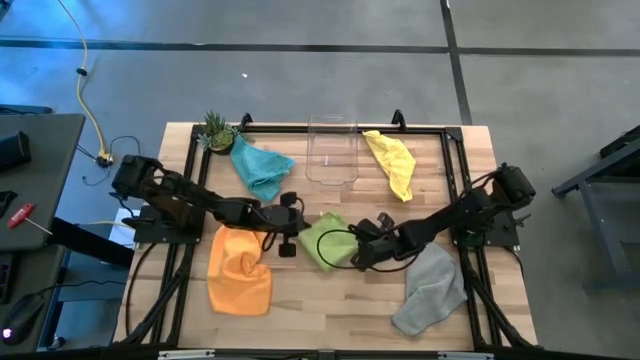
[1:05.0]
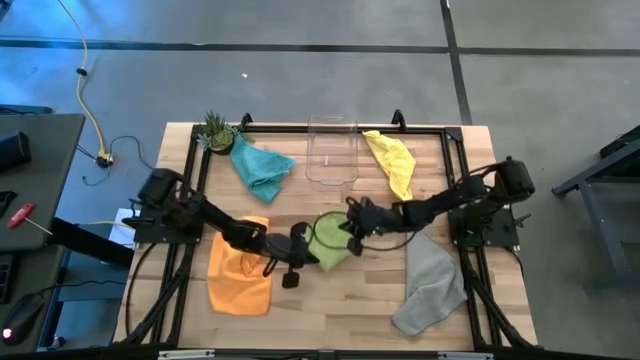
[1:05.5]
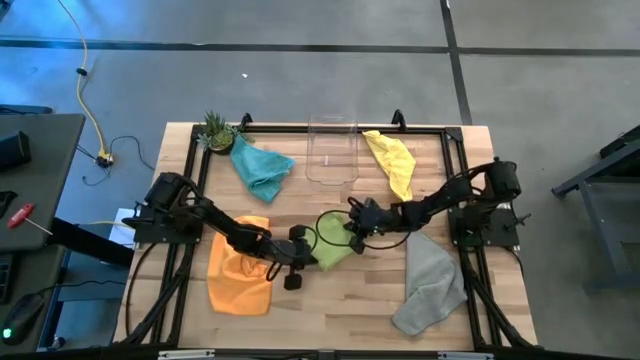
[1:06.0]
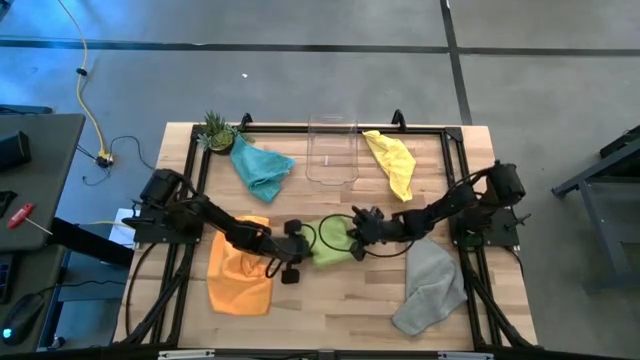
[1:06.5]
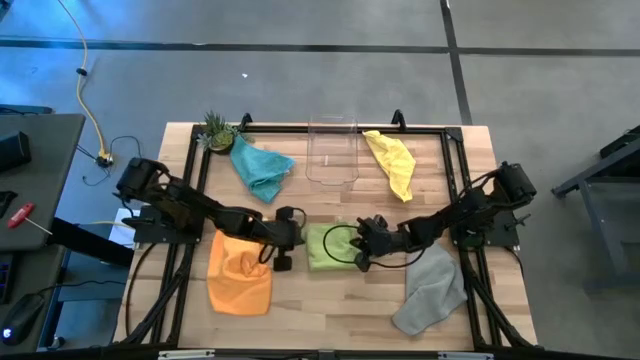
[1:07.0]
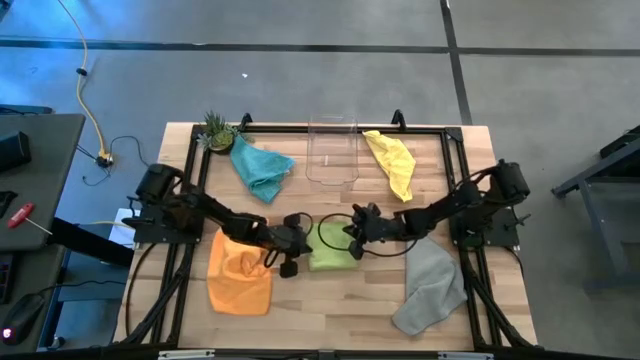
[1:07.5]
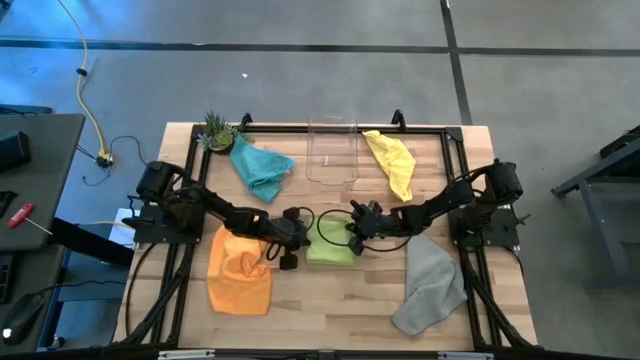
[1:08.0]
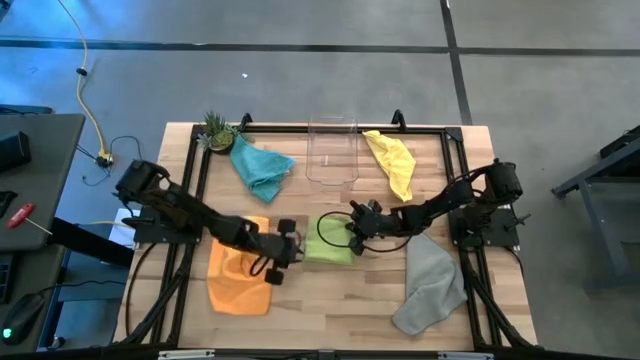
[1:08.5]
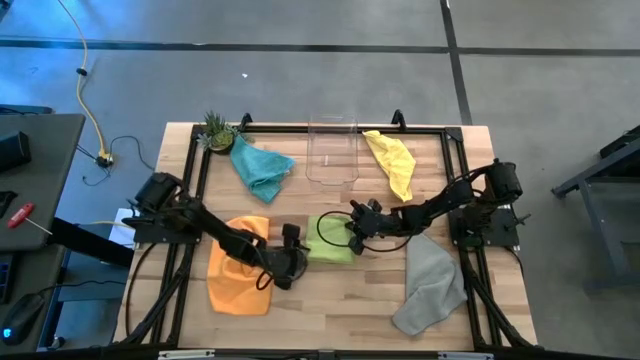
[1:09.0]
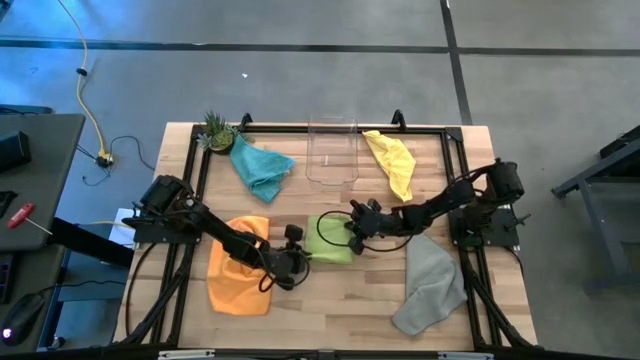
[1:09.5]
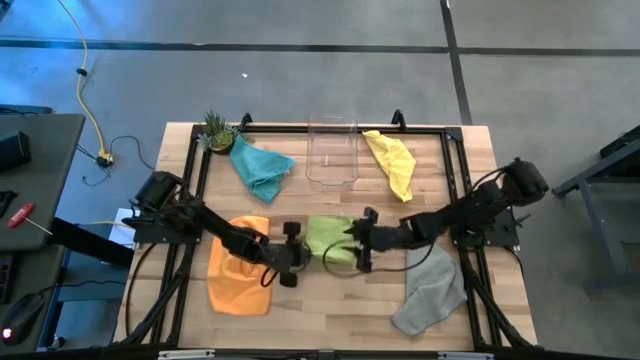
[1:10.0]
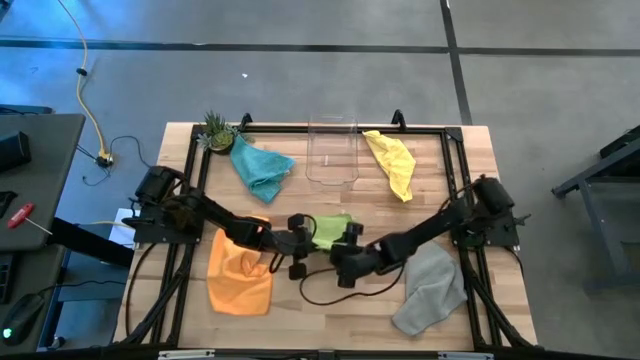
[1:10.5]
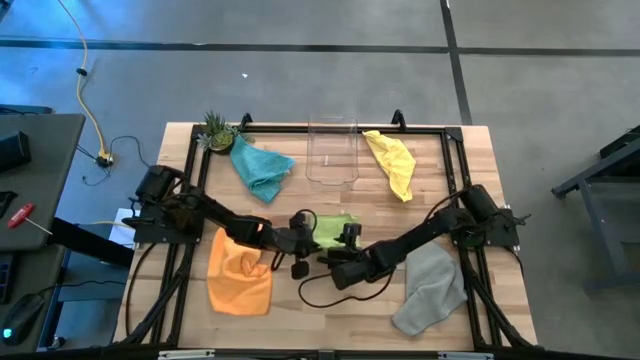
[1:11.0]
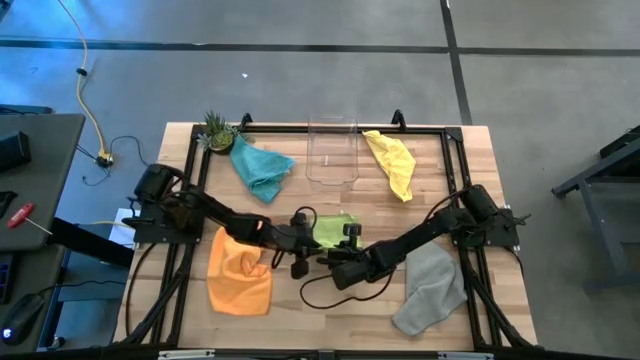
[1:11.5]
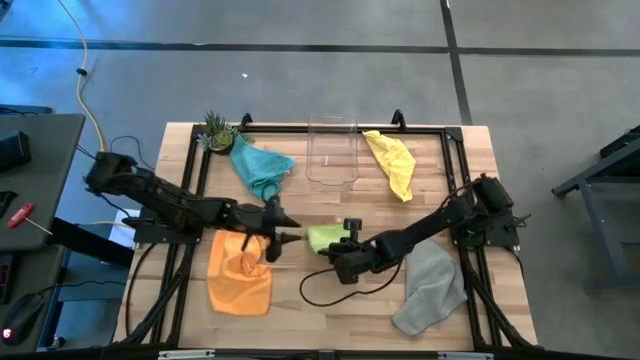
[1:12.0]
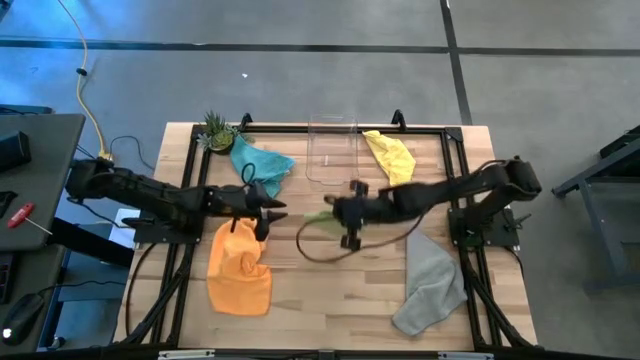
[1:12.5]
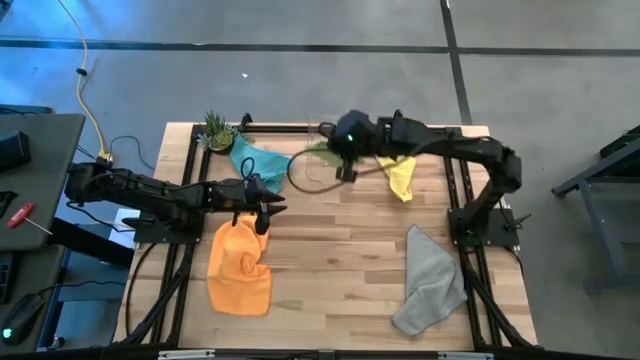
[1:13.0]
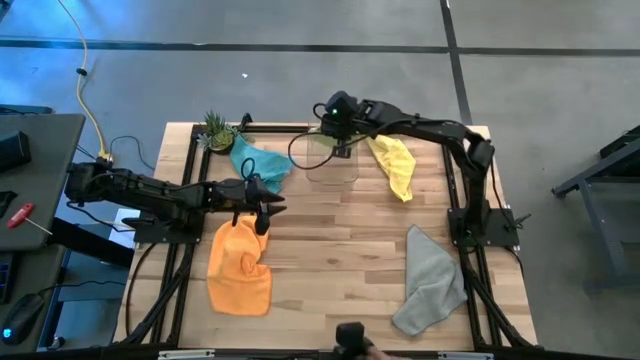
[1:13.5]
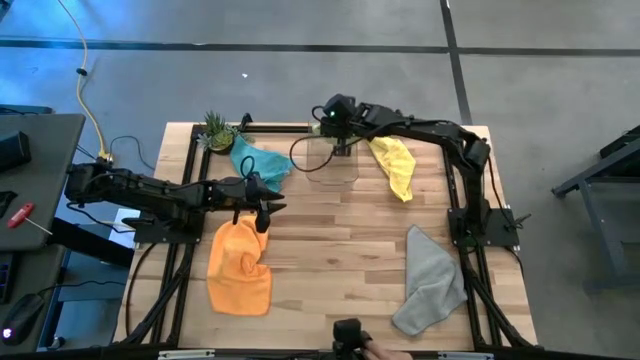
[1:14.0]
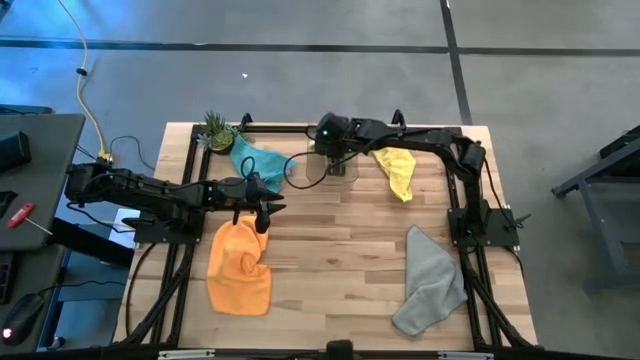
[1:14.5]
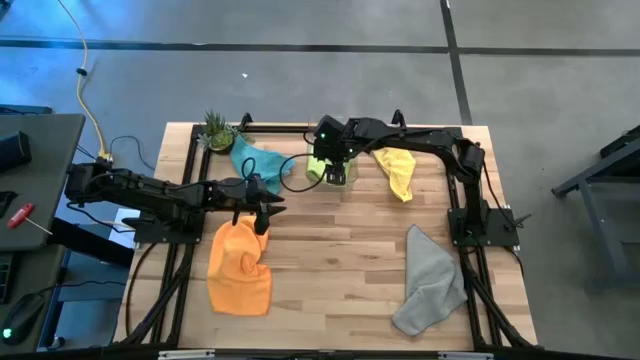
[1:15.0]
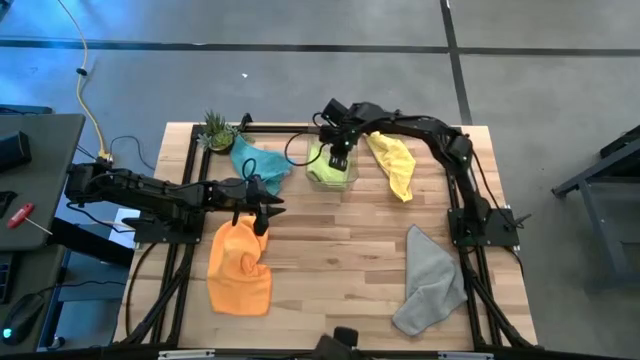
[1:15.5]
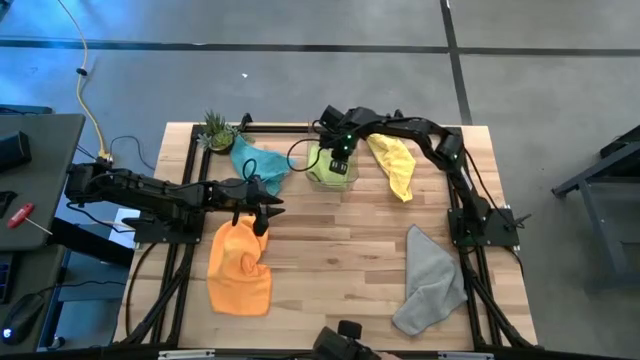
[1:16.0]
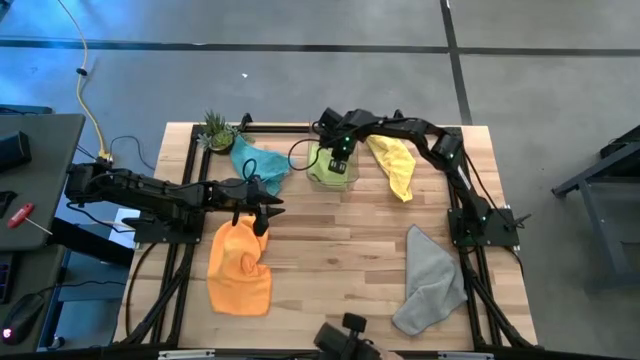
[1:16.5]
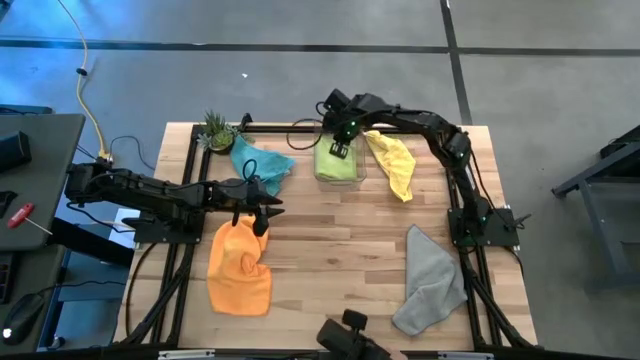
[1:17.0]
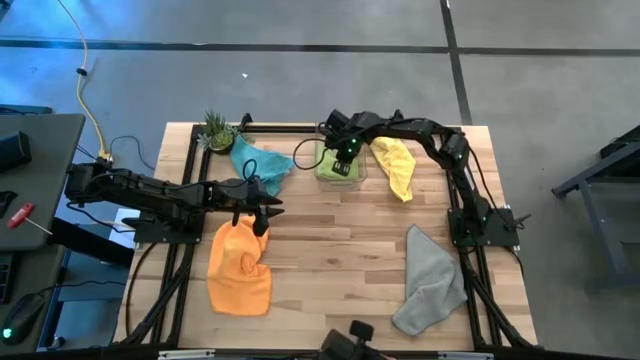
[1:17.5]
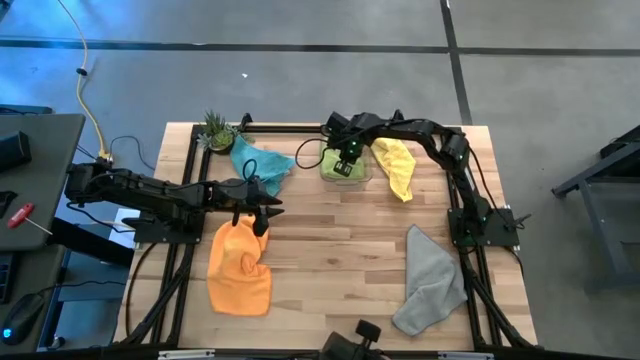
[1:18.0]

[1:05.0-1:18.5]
Task: Fold microfiber towels
Put the green microfiber cloth into the transparent bin

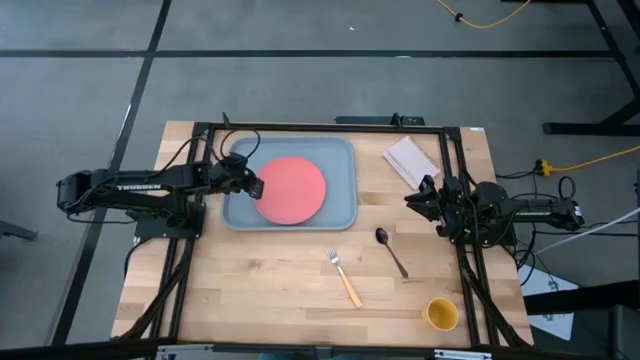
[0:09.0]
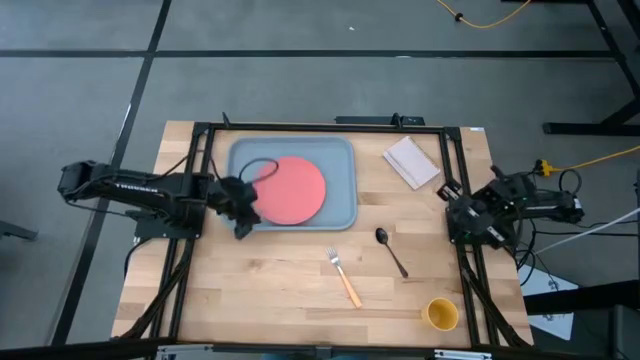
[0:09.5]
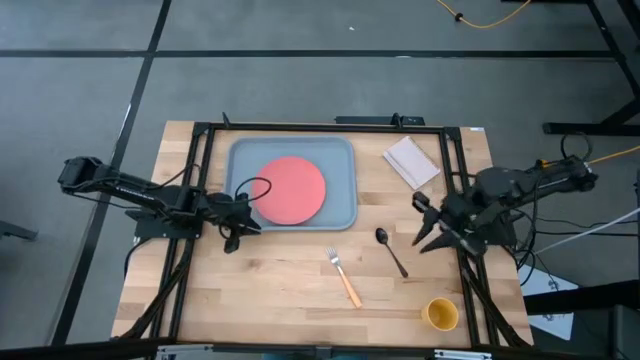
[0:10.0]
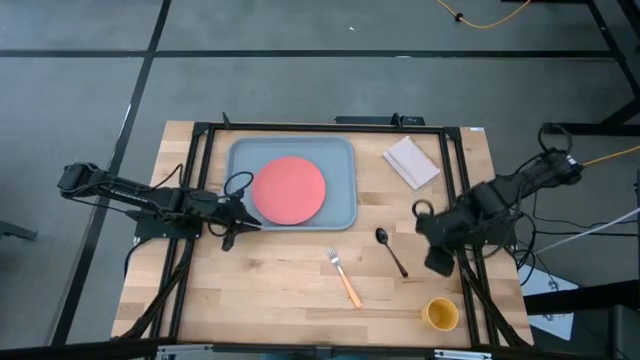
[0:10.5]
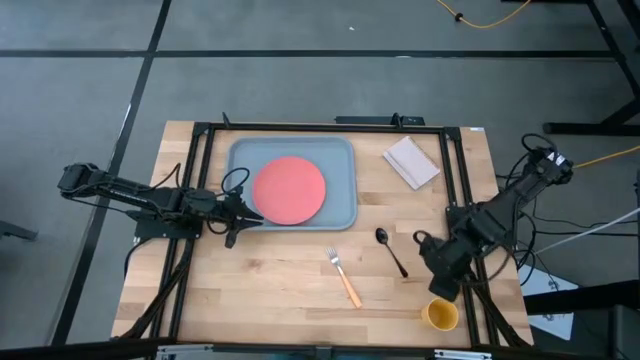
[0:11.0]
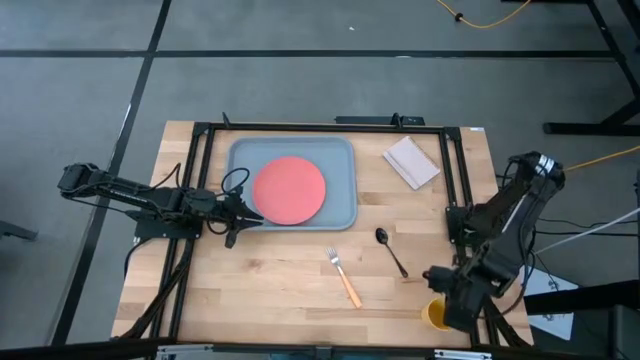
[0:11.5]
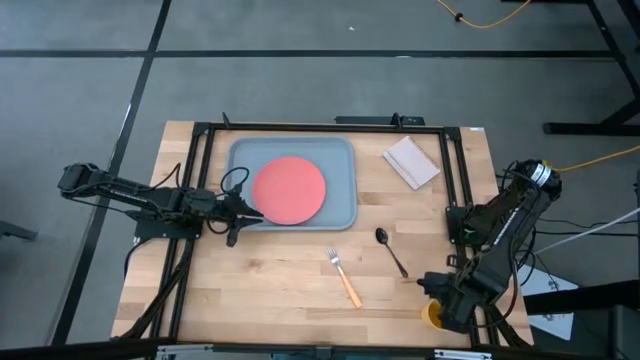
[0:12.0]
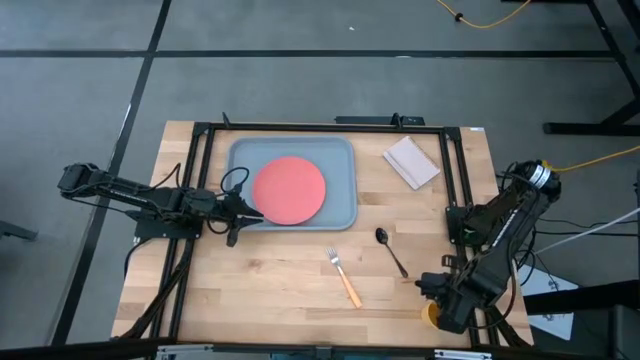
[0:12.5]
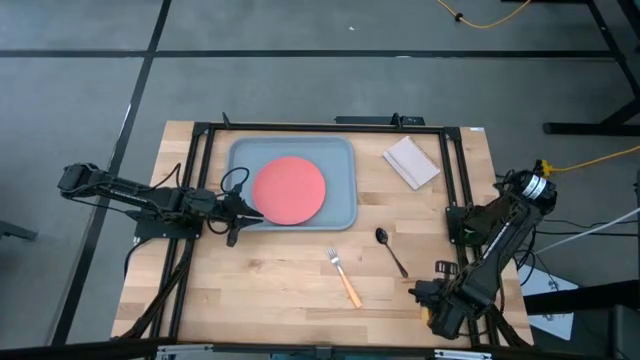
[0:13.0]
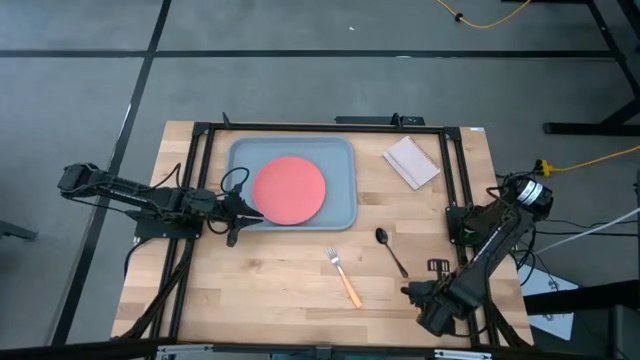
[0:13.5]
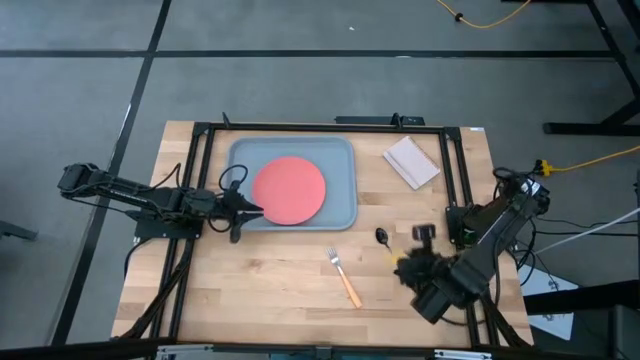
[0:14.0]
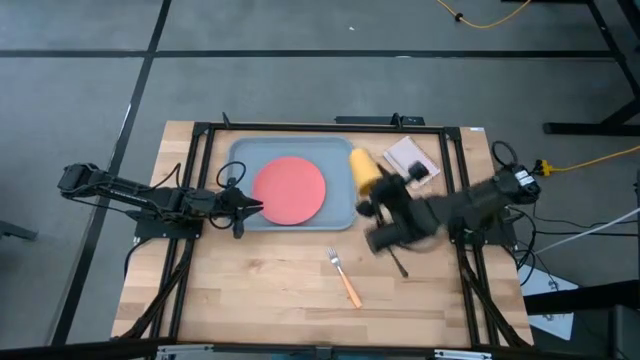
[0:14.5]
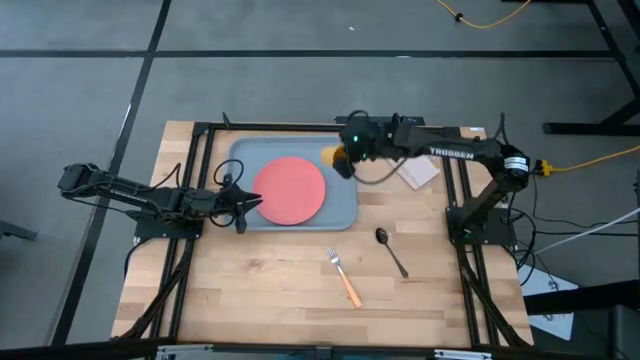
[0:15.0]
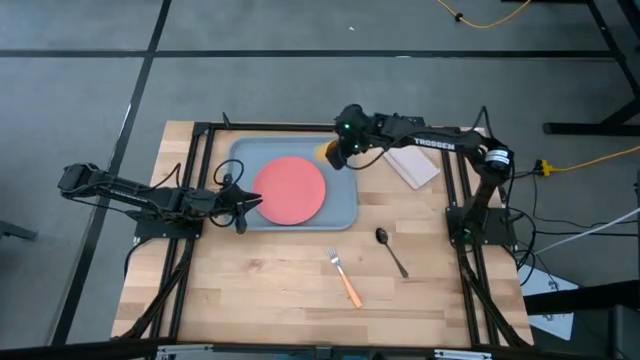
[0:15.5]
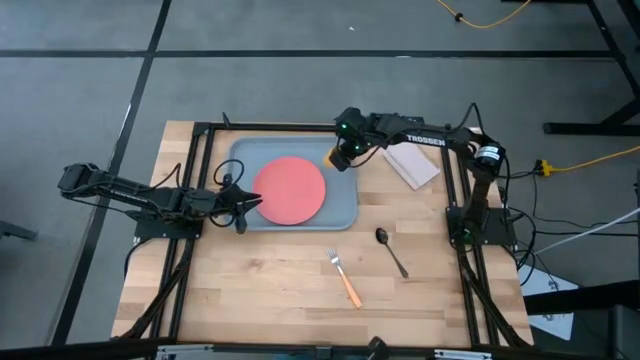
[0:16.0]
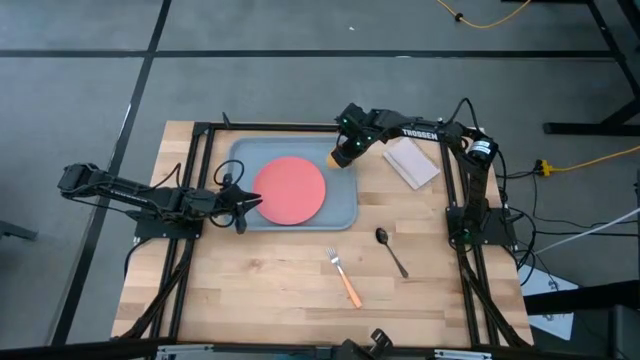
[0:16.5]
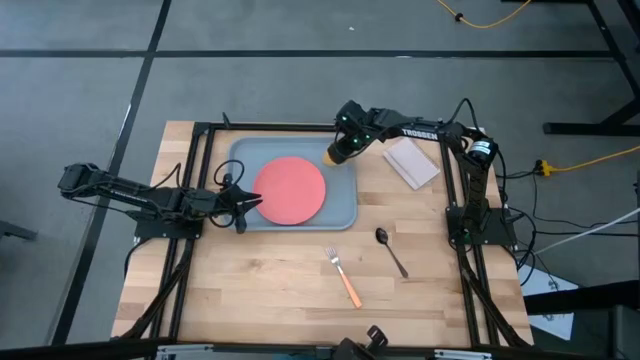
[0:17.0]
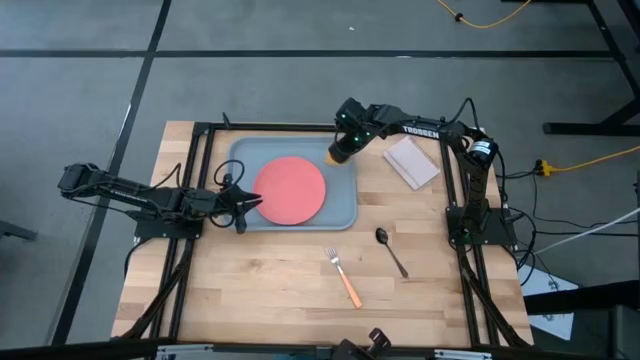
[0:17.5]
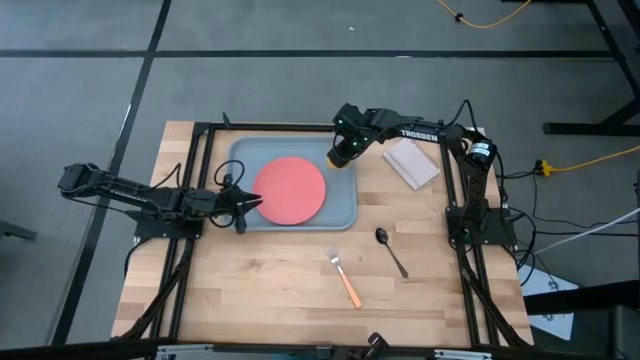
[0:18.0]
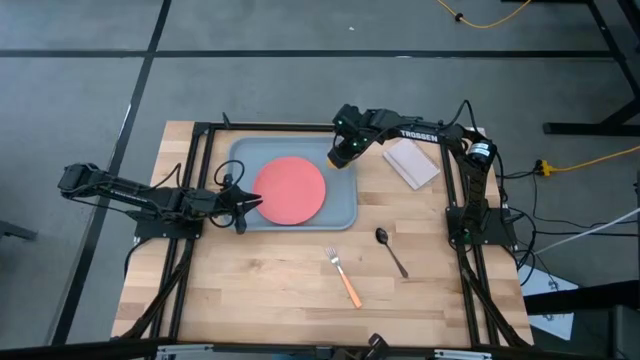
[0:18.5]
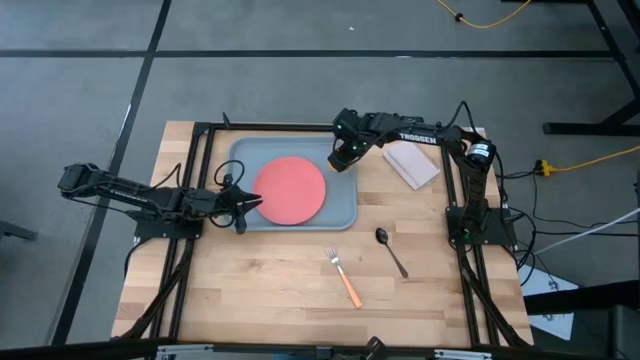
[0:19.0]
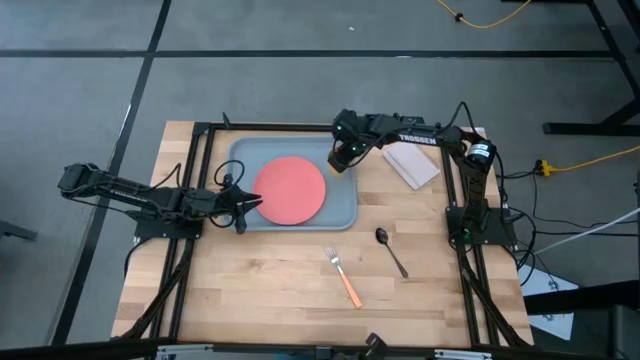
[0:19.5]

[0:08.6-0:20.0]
Task: Pick and place plate/cup/fork/spoon on tray
Put the yellow cup on the blue serving tray to the top right of the pink plate
